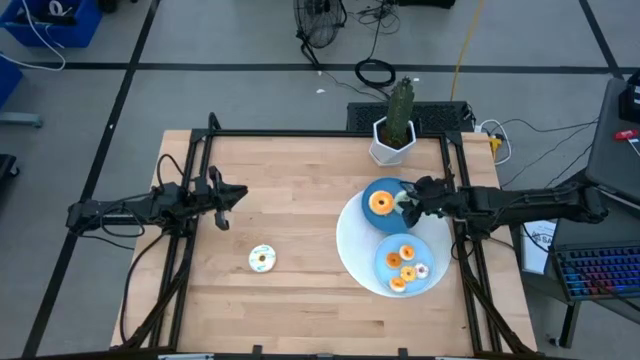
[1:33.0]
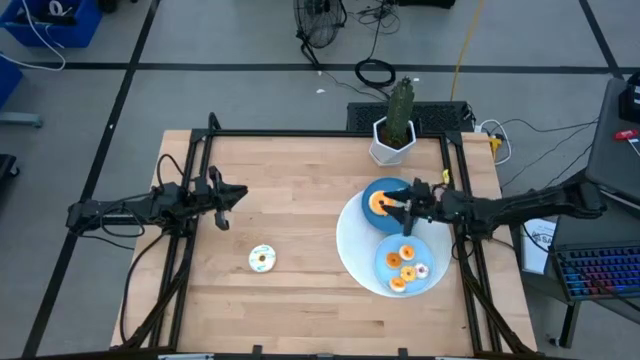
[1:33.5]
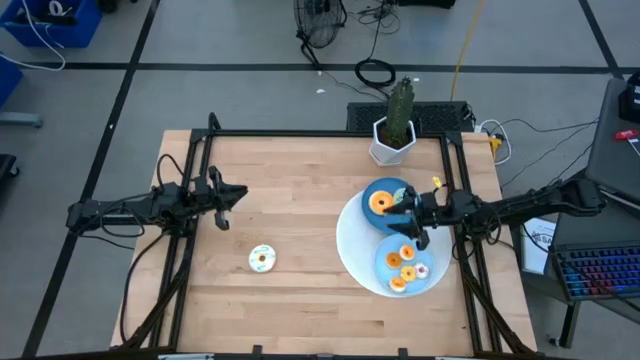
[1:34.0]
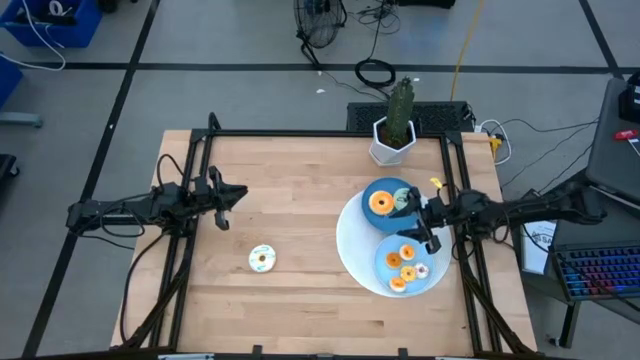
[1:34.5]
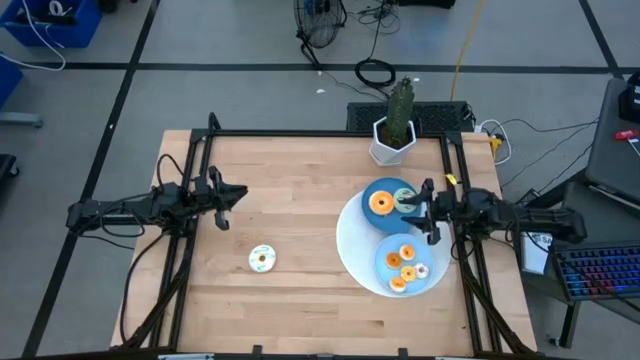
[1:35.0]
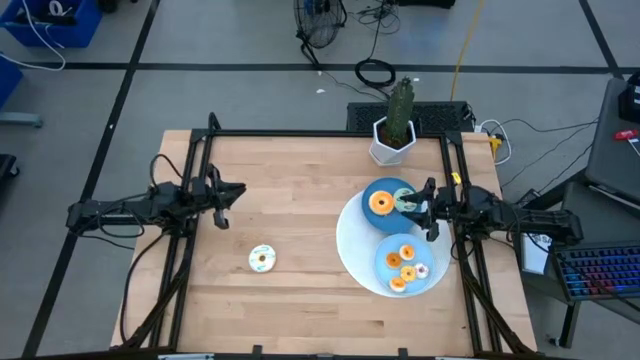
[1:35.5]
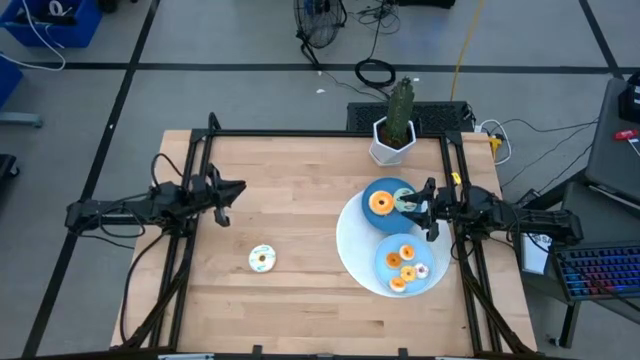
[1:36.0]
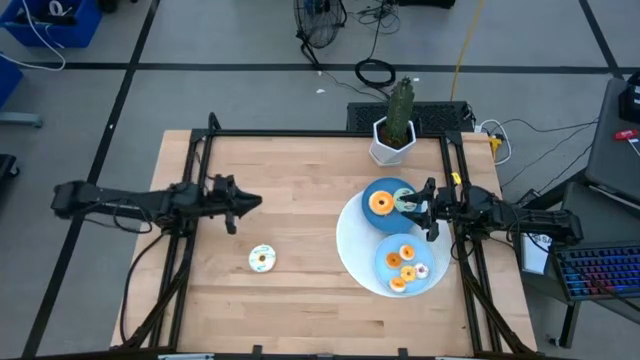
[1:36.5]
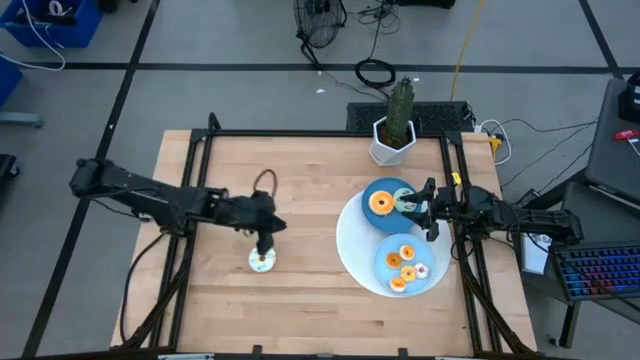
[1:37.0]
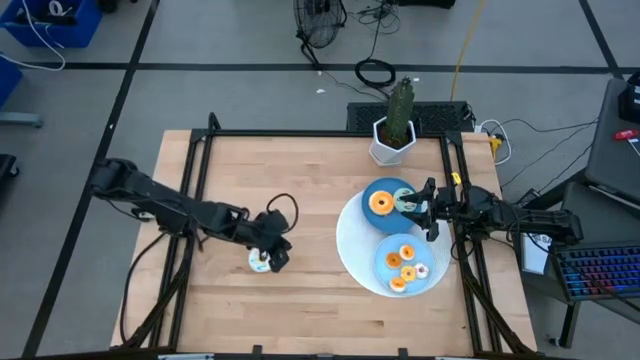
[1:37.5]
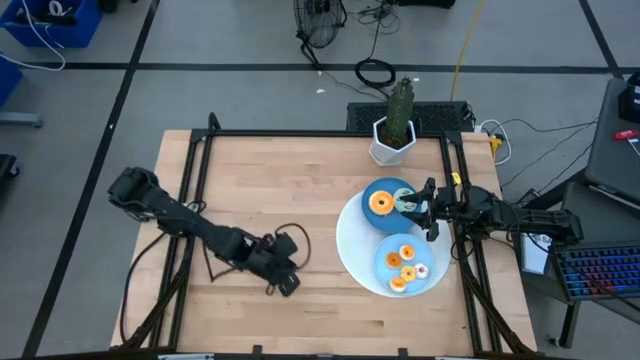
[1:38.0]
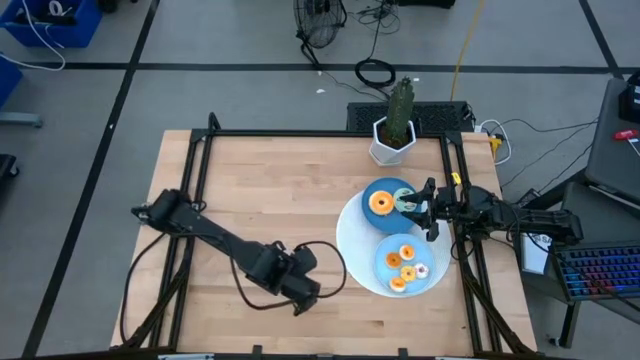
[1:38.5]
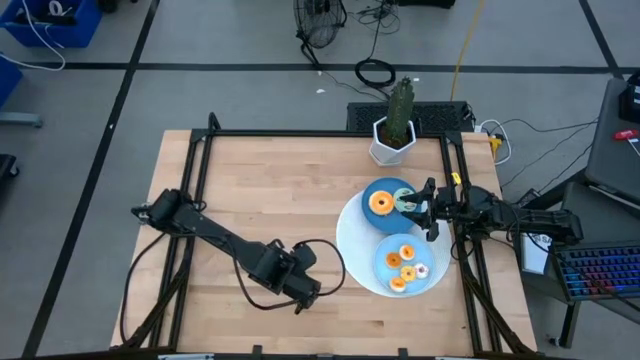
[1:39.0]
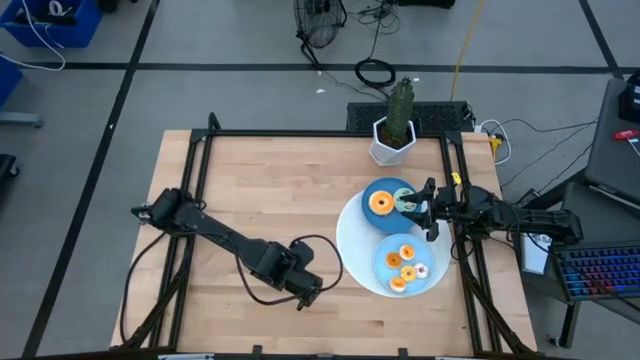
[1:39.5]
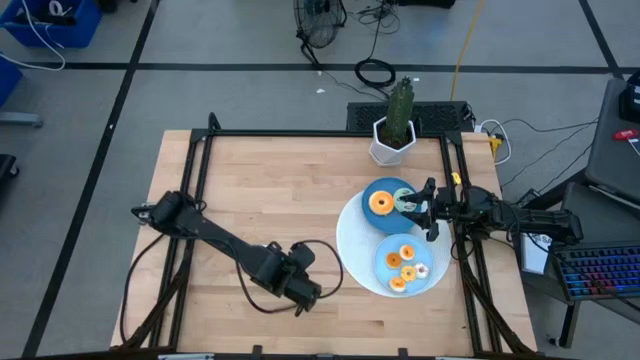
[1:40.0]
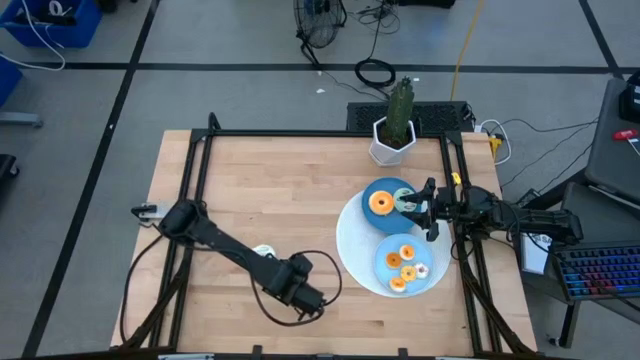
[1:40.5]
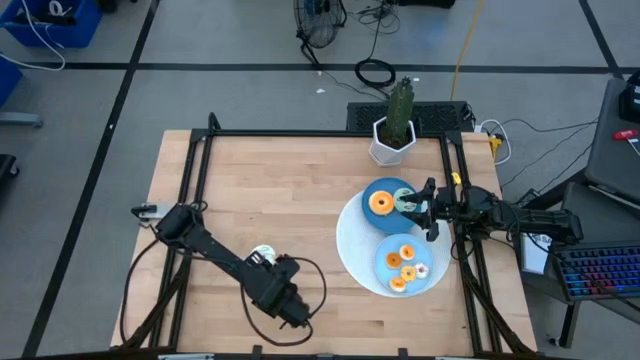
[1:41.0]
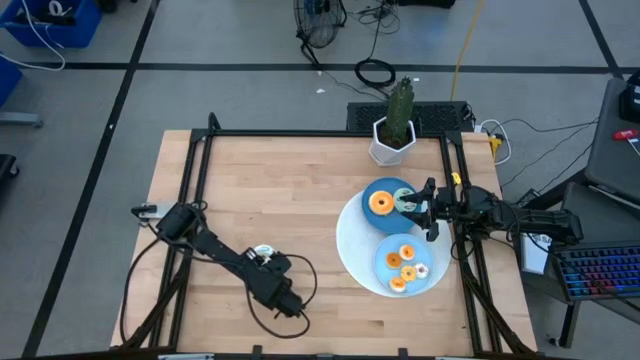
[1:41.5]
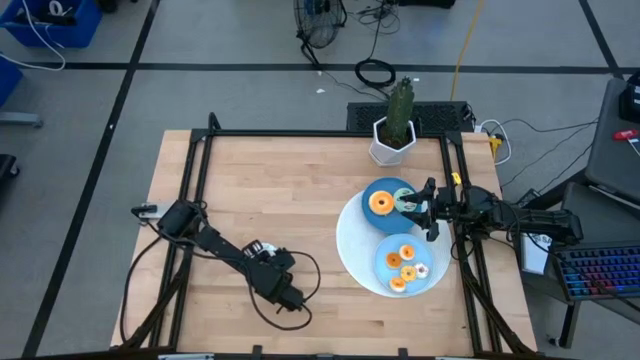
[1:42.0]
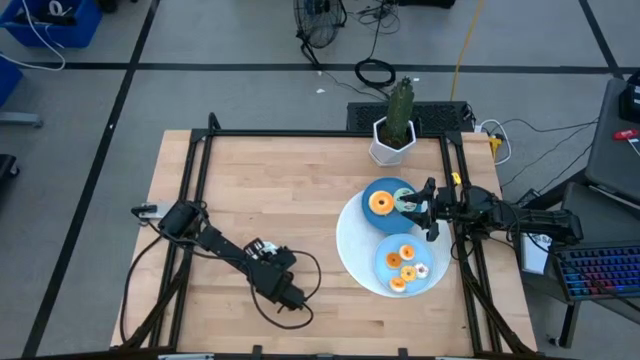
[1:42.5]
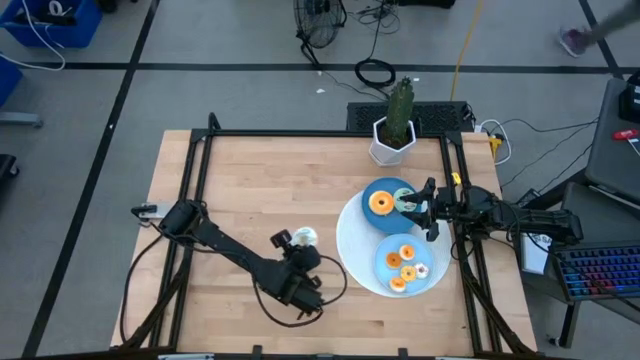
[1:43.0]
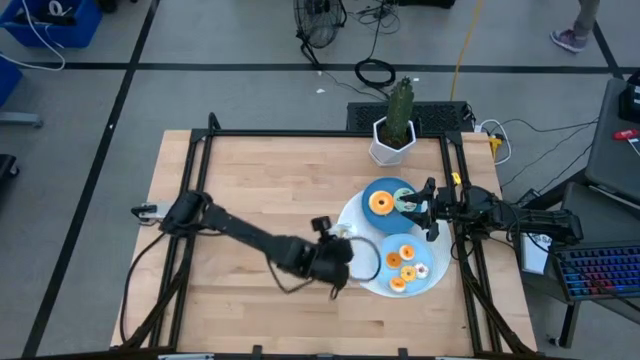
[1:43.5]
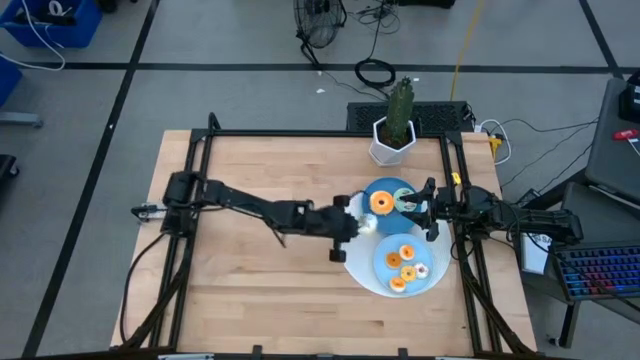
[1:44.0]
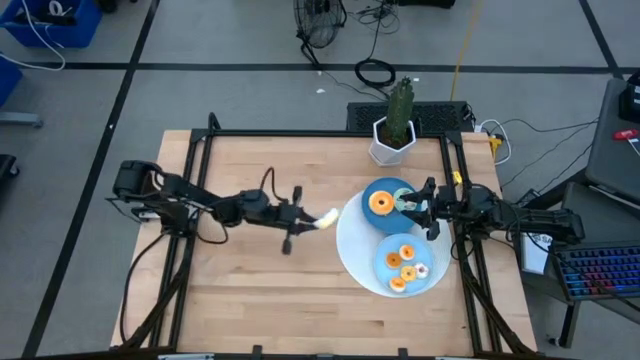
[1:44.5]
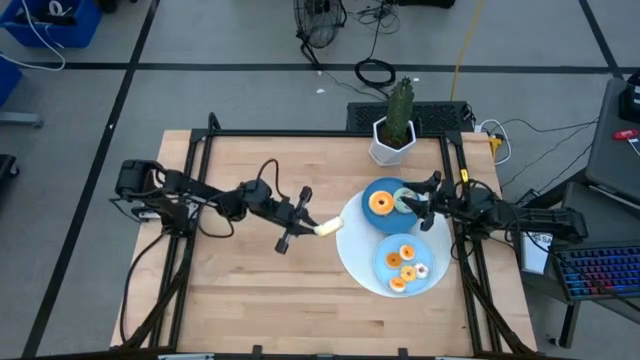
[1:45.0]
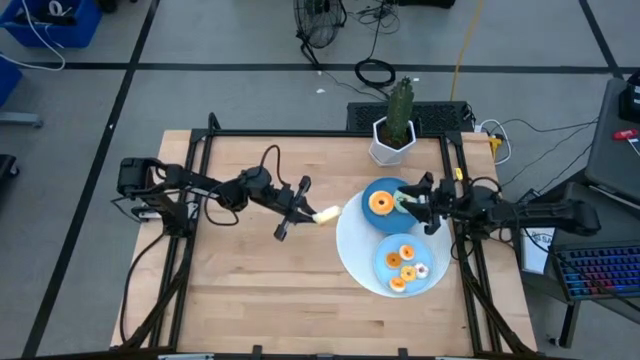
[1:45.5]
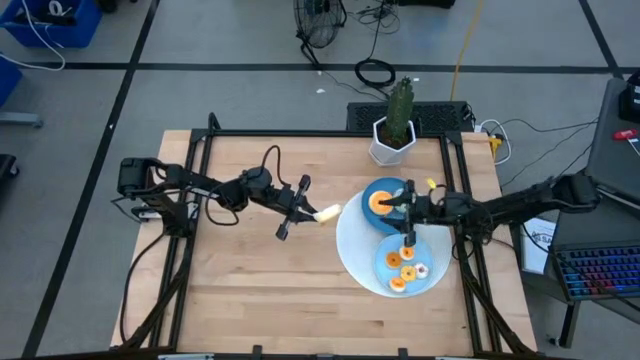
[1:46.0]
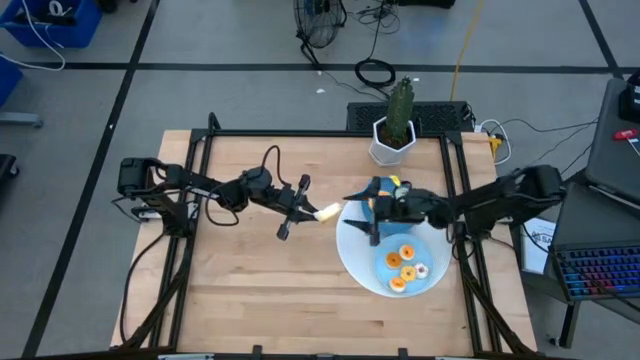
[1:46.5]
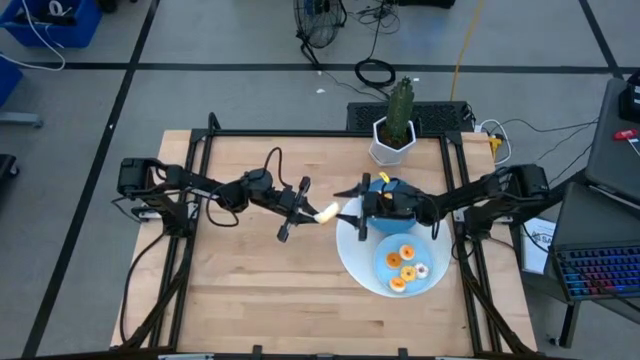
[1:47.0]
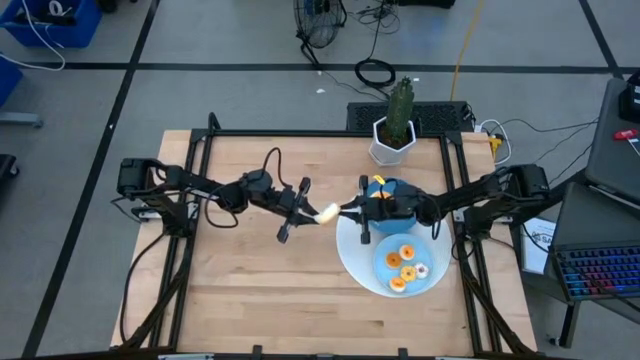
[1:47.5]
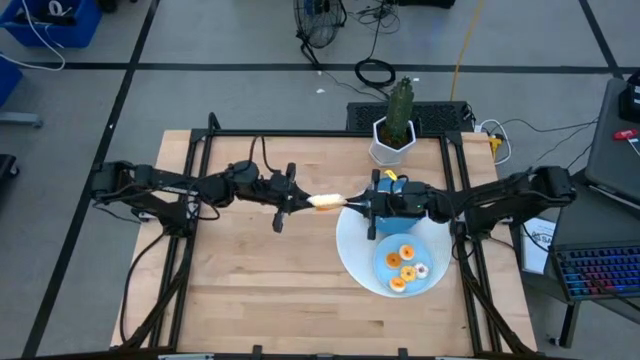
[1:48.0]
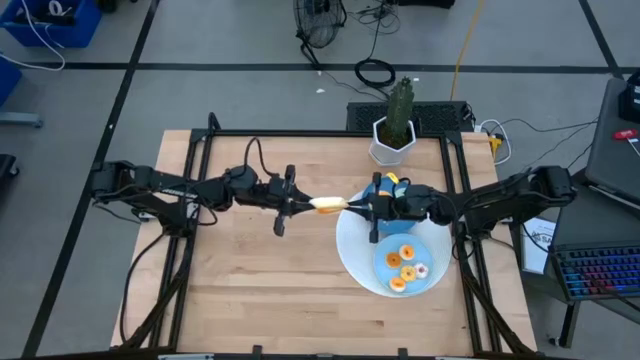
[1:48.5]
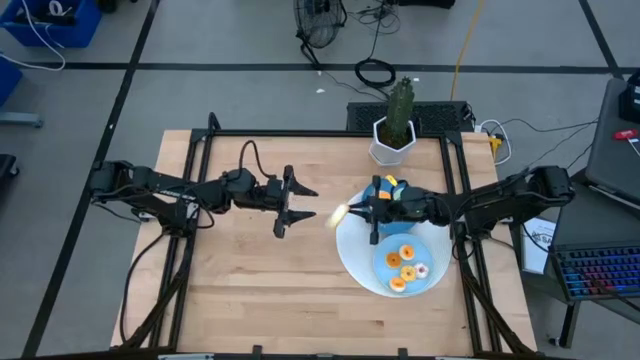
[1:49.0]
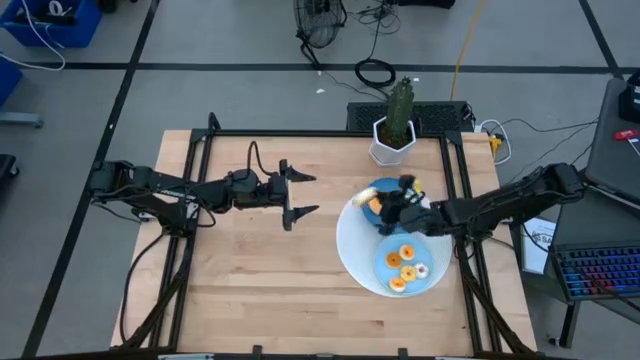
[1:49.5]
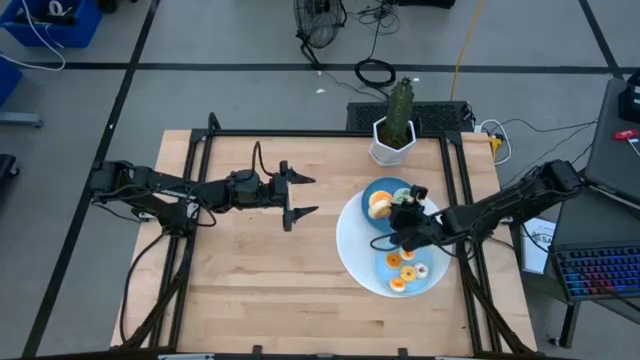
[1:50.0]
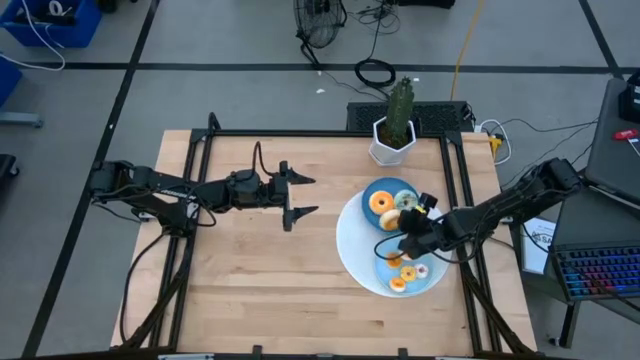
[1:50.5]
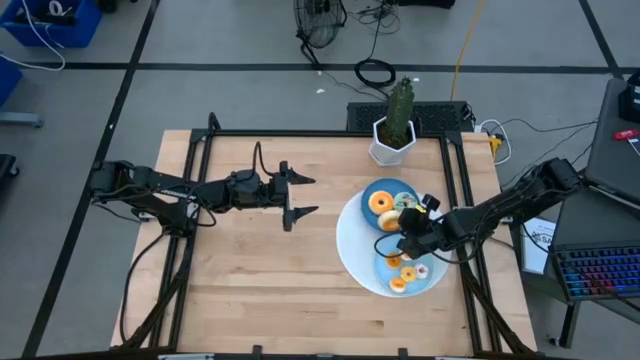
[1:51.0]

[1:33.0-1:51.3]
Task: Pick & Place donuts
Put the big white donut on the blue plate

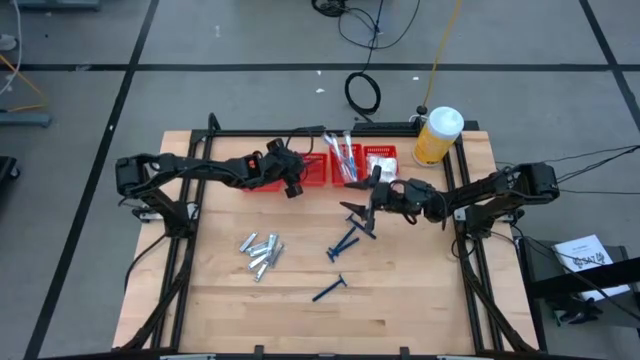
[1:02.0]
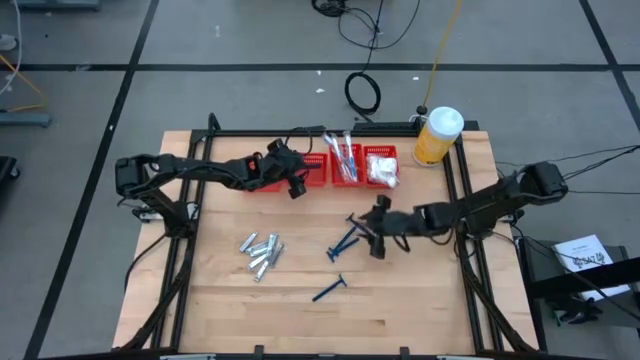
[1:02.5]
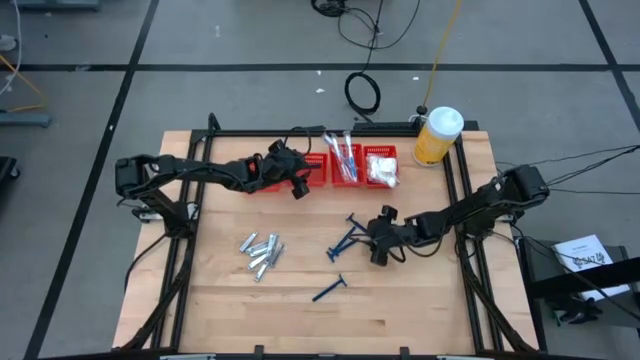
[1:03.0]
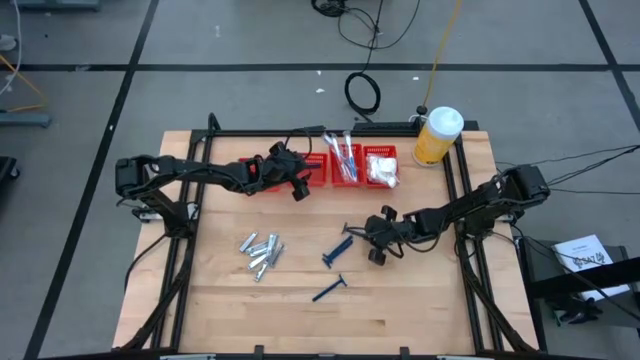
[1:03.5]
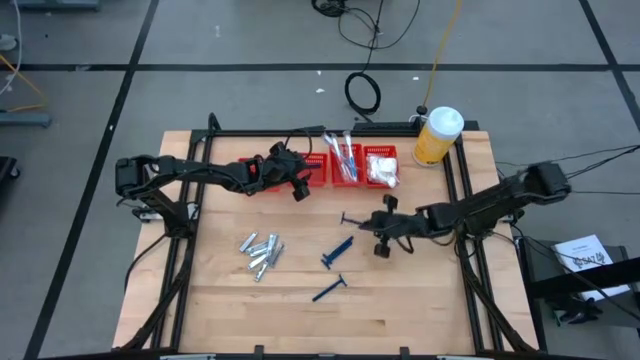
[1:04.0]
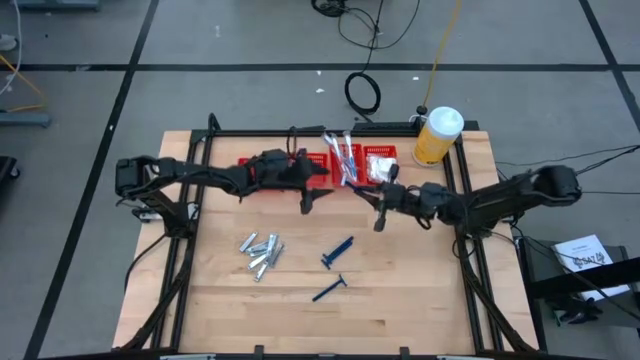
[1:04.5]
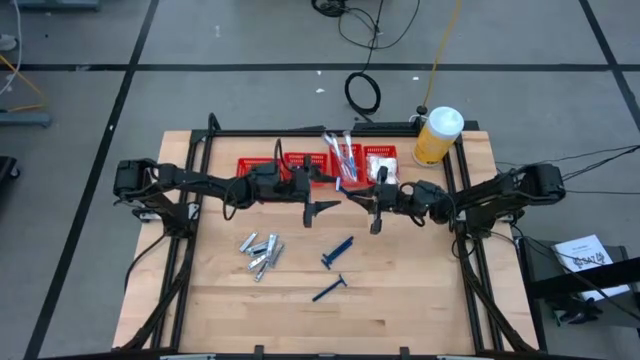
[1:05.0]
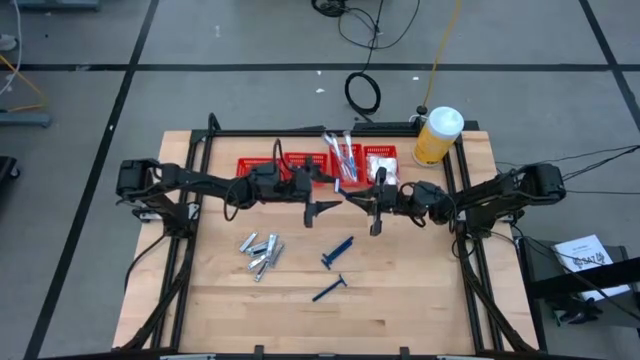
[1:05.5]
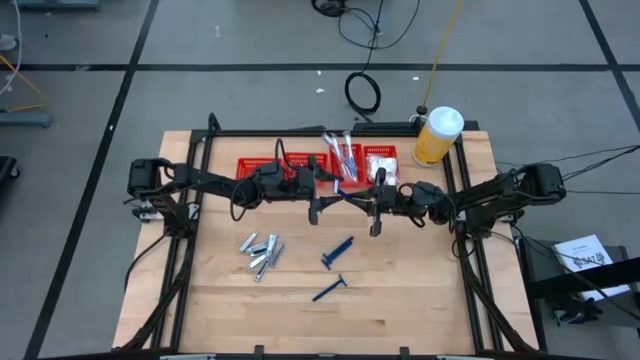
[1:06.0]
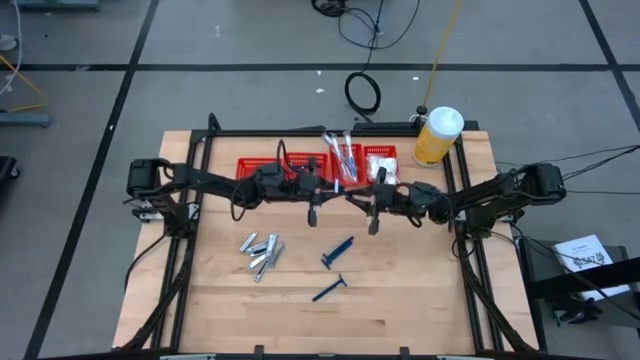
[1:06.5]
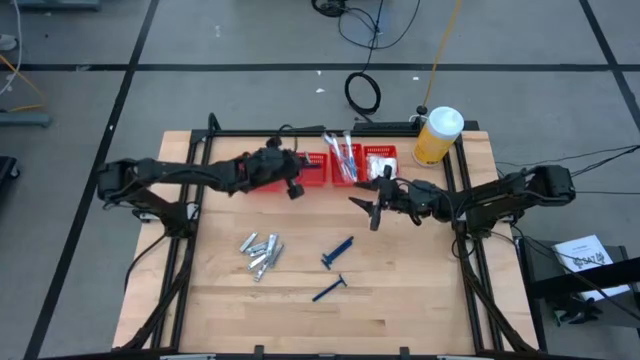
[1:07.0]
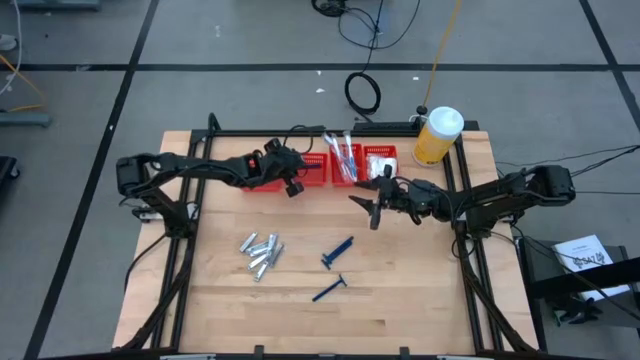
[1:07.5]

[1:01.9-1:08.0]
Task: Pick & Place Travel size toiletries
Put the top razor into the horizontal right red bin
